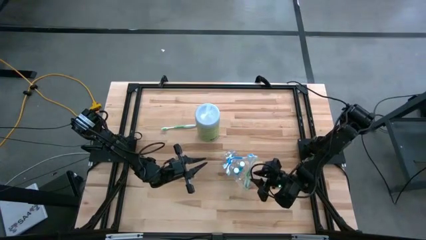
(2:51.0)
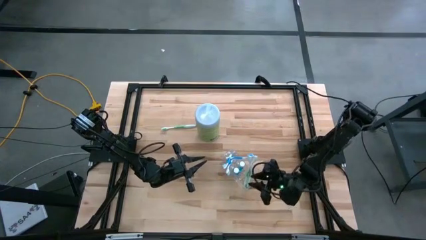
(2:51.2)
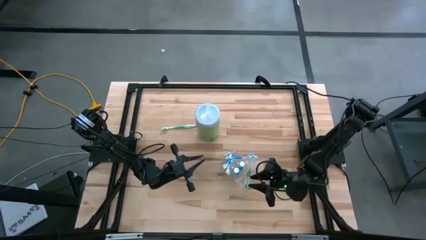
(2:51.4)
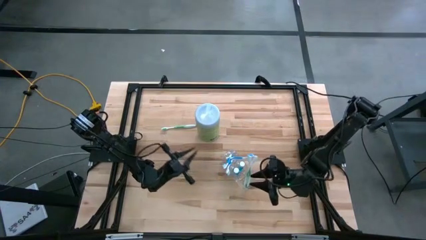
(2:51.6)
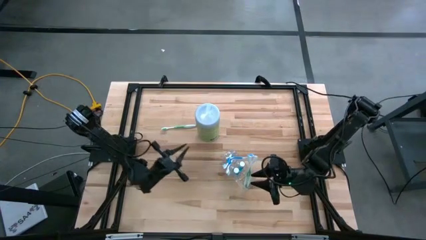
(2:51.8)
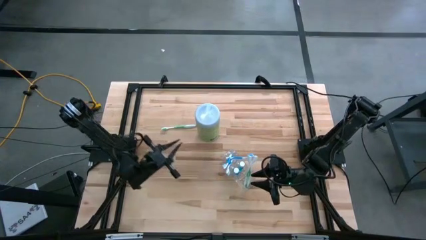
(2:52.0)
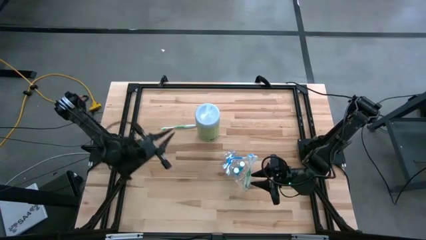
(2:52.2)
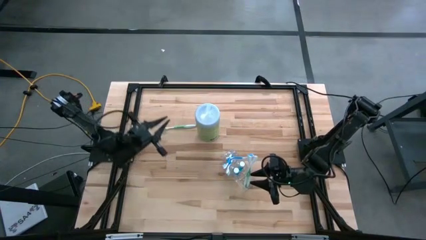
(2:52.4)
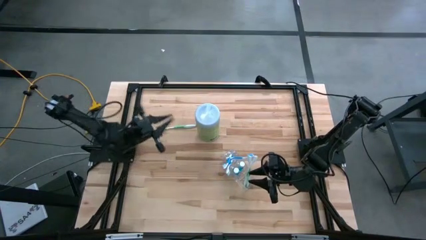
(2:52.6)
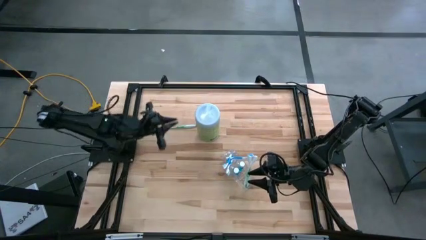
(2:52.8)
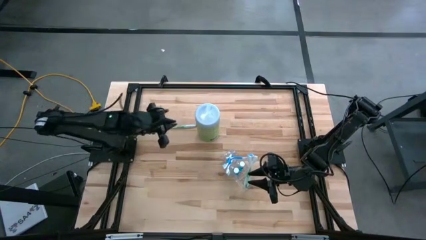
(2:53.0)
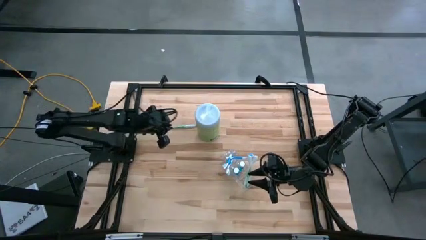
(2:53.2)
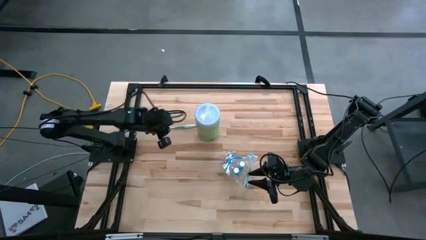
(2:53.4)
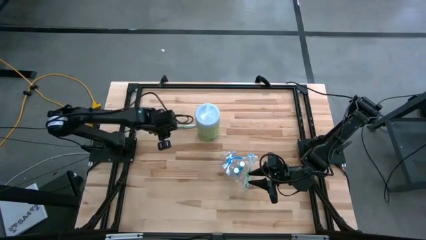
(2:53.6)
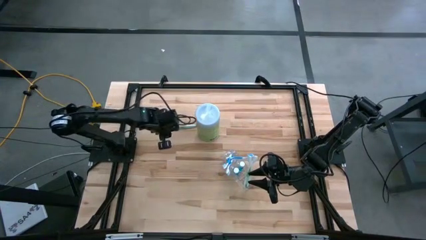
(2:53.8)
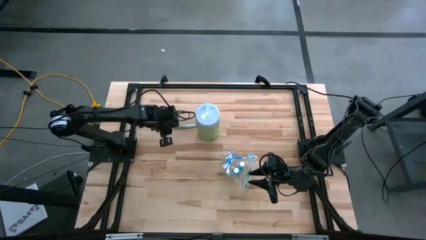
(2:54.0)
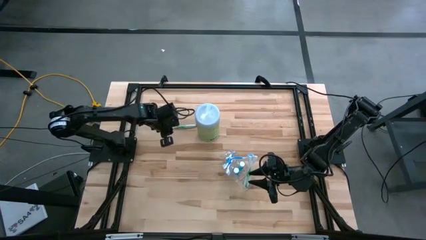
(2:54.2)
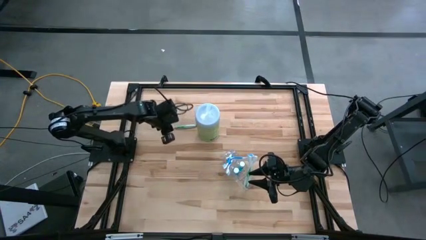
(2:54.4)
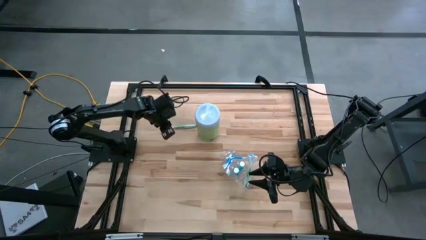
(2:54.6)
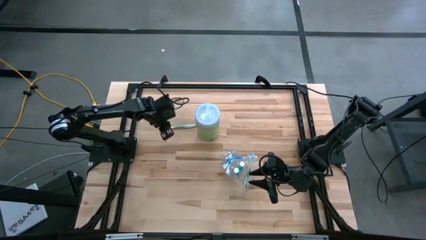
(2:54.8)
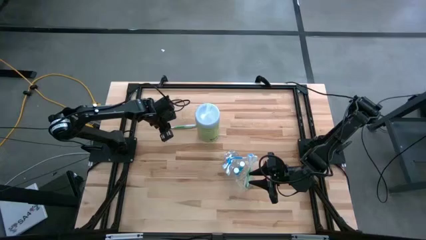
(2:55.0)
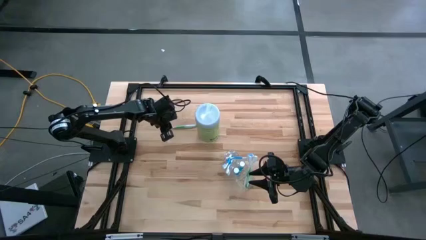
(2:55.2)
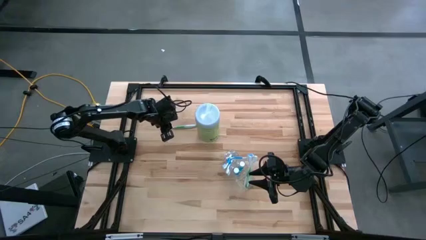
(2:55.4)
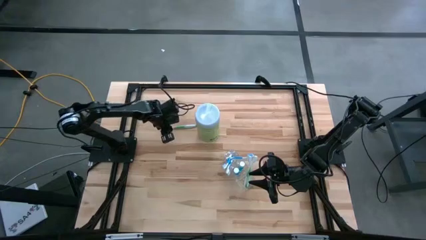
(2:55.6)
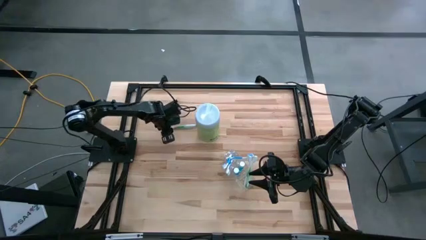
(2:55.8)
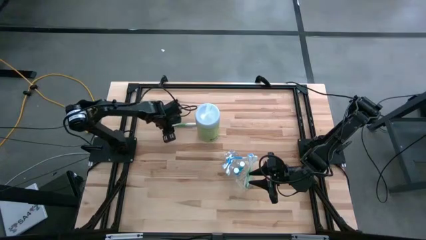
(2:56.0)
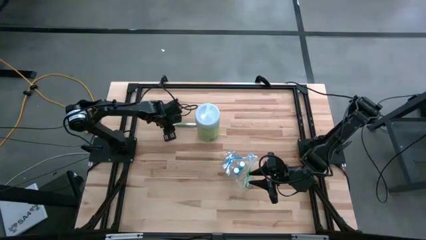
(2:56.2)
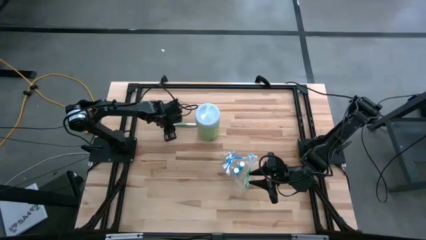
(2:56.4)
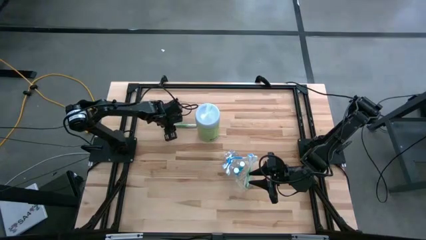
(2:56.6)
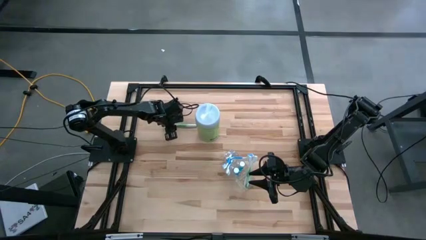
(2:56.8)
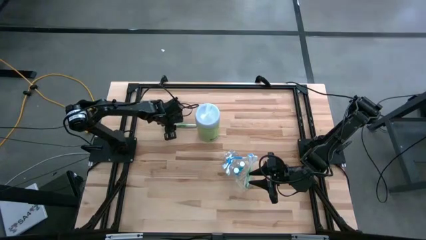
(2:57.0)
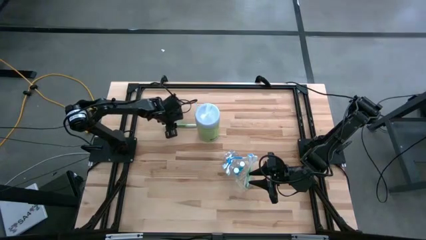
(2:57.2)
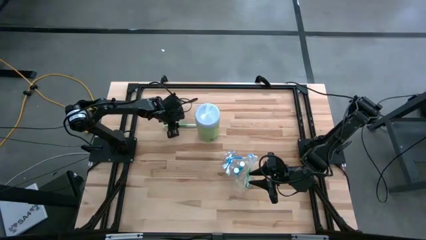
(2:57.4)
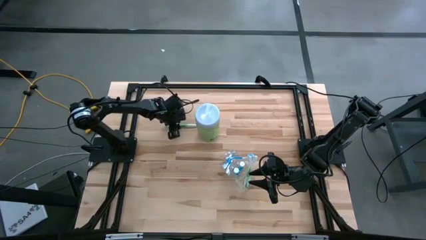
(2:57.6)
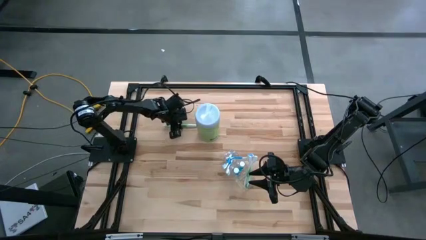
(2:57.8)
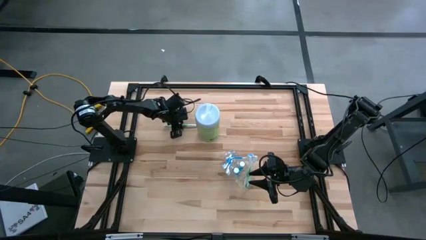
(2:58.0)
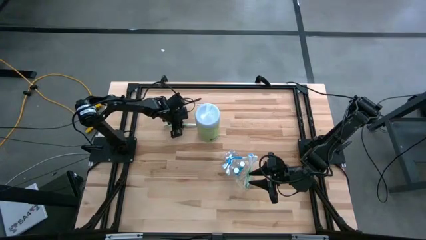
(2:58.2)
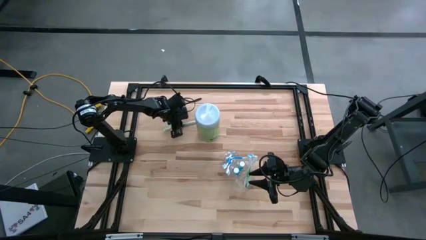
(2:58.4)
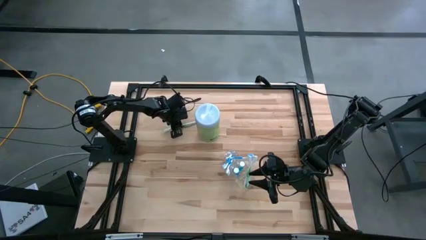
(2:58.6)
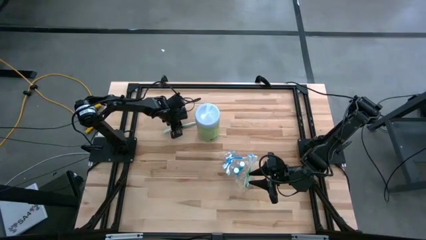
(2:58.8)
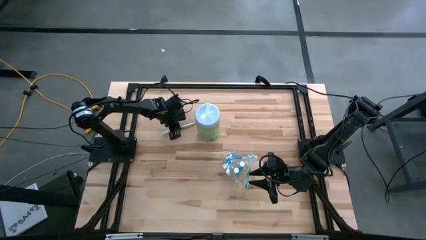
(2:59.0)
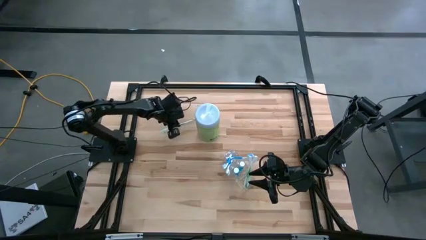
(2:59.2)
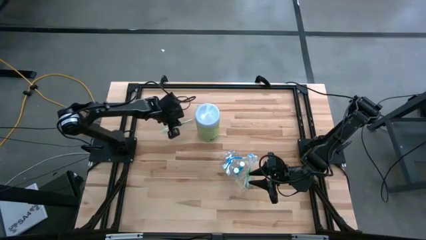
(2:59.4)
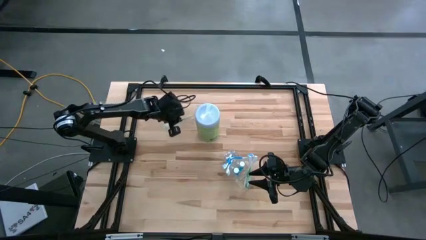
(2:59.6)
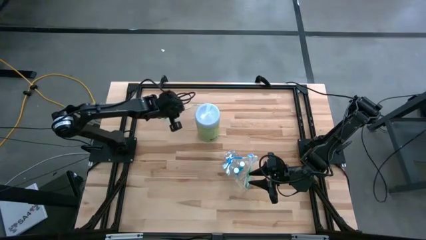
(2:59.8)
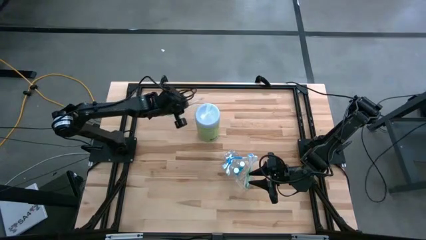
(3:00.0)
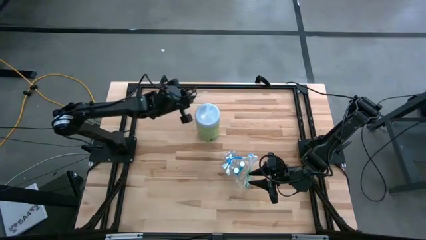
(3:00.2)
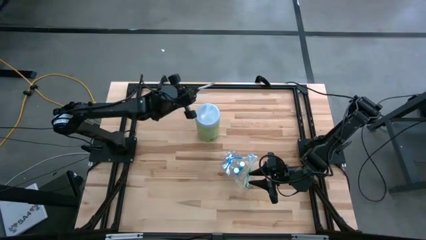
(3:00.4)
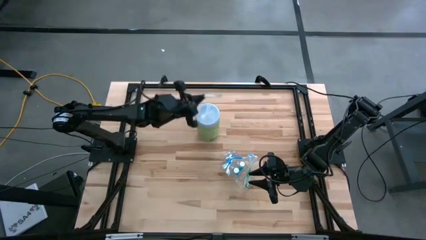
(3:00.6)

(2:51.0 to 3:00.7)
Task: Pick & Place toothbrushing station
Put the green toothbrush into the transparent organizer

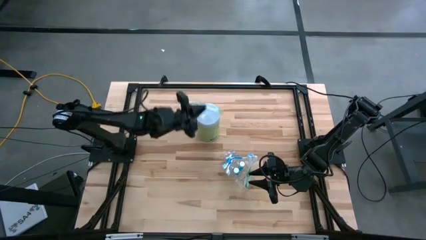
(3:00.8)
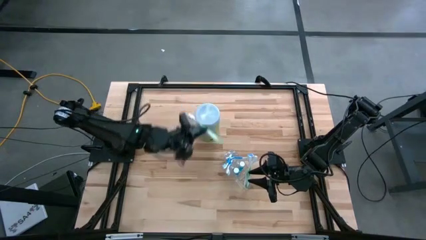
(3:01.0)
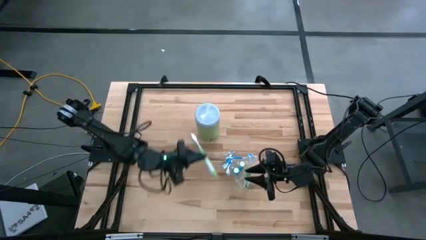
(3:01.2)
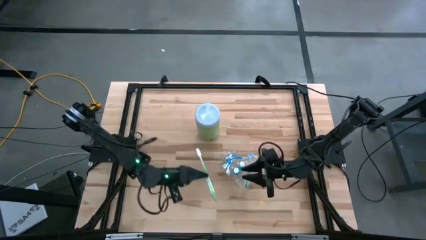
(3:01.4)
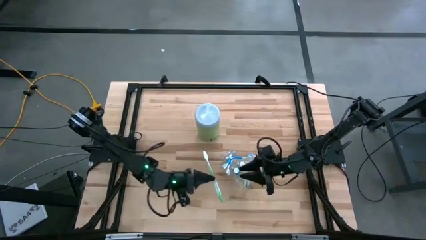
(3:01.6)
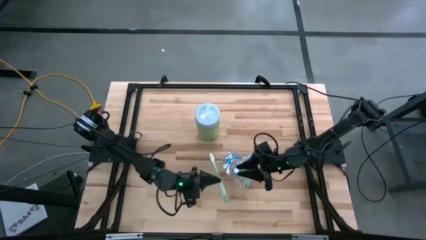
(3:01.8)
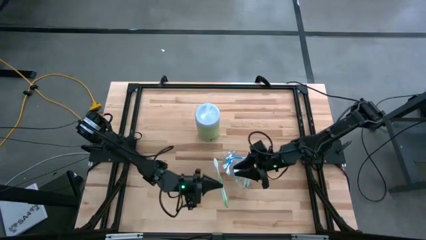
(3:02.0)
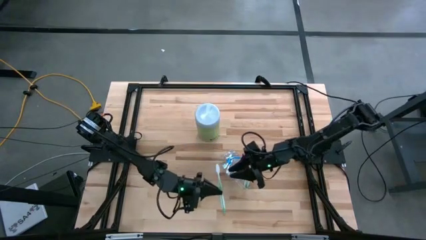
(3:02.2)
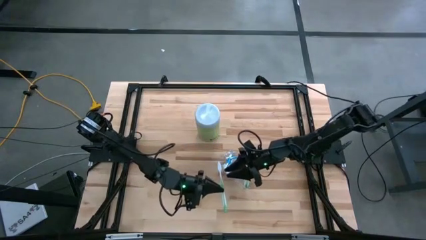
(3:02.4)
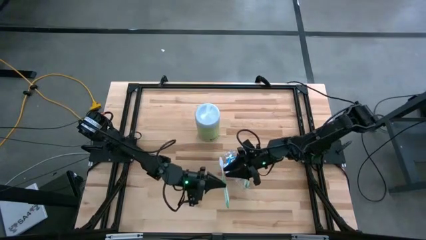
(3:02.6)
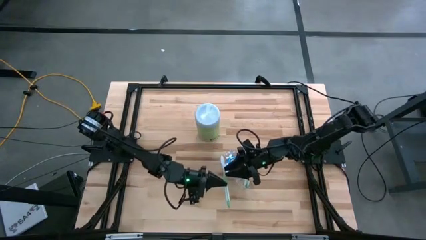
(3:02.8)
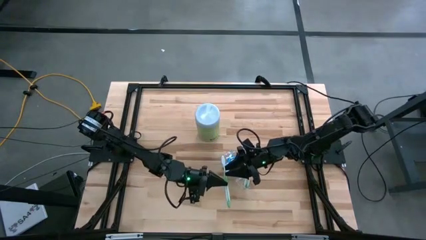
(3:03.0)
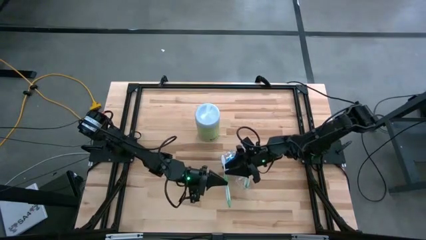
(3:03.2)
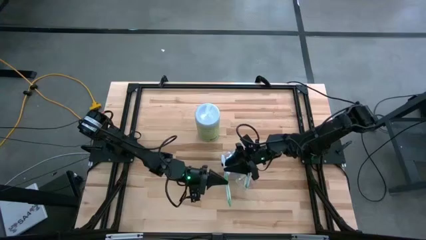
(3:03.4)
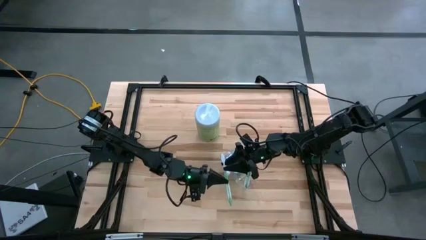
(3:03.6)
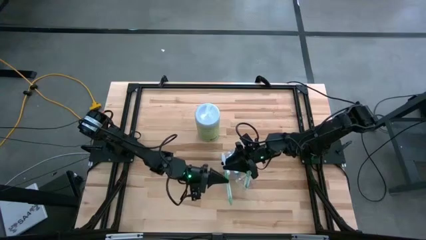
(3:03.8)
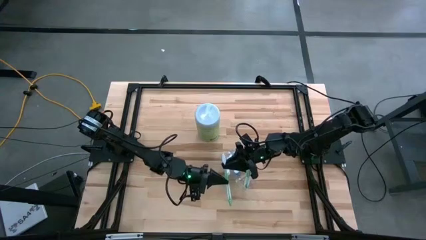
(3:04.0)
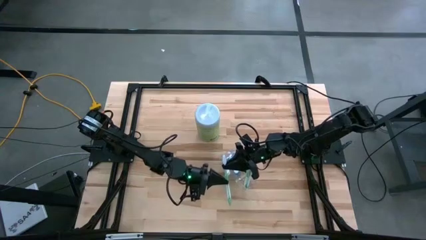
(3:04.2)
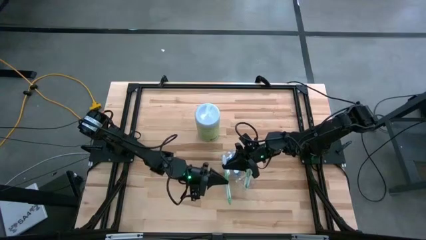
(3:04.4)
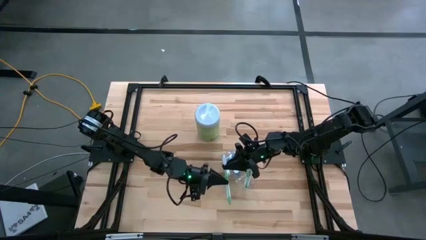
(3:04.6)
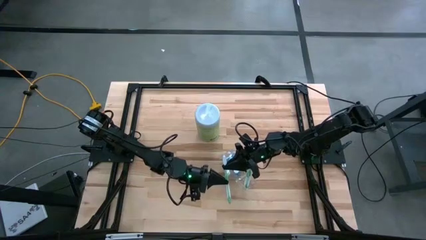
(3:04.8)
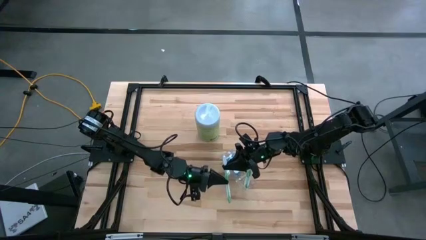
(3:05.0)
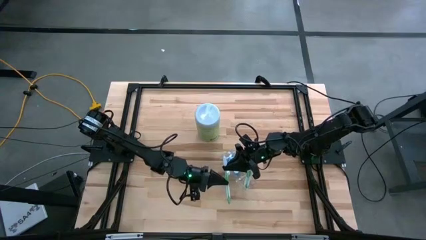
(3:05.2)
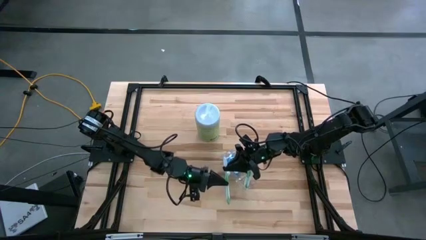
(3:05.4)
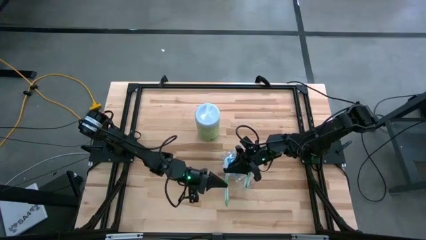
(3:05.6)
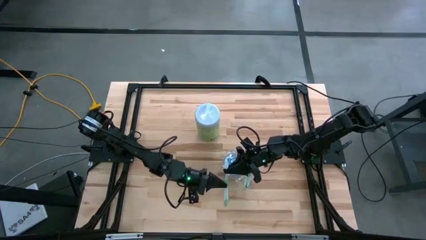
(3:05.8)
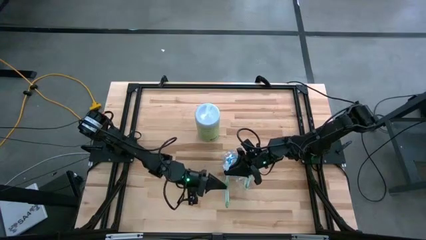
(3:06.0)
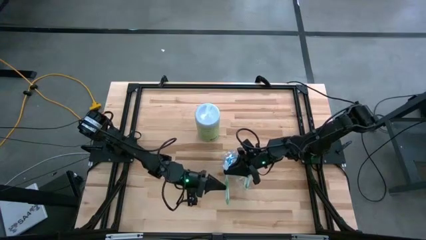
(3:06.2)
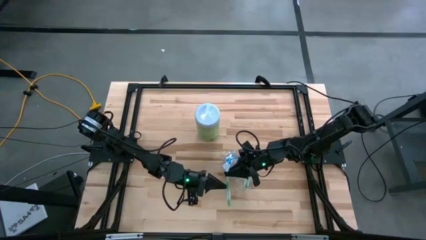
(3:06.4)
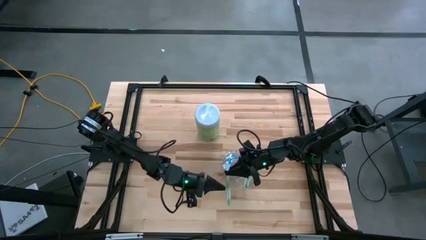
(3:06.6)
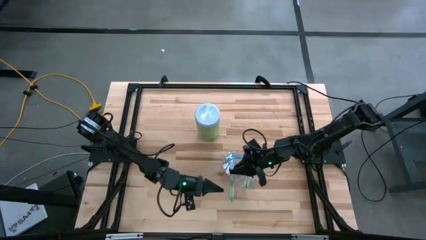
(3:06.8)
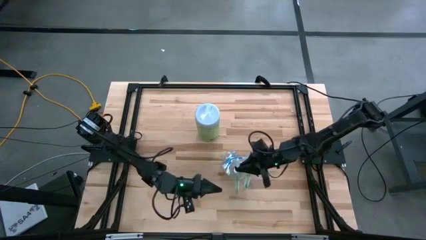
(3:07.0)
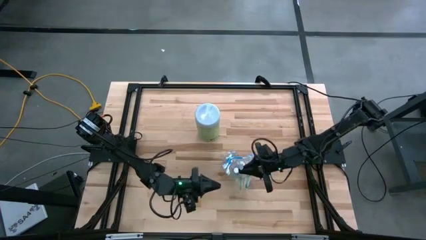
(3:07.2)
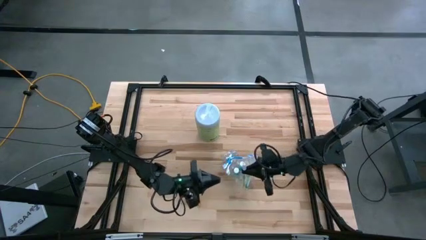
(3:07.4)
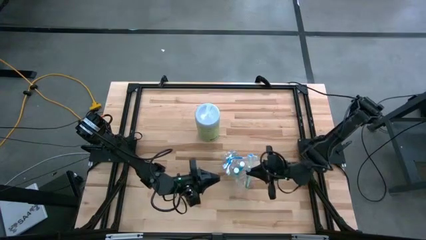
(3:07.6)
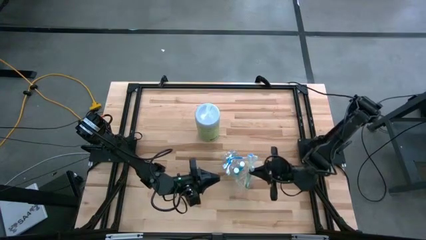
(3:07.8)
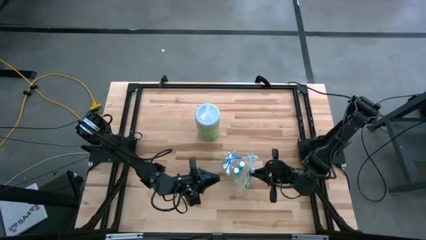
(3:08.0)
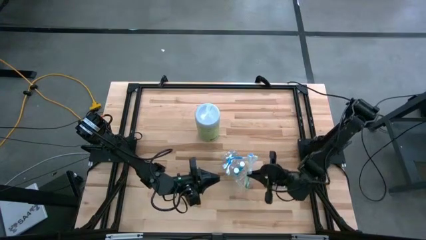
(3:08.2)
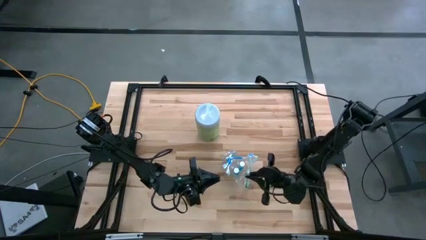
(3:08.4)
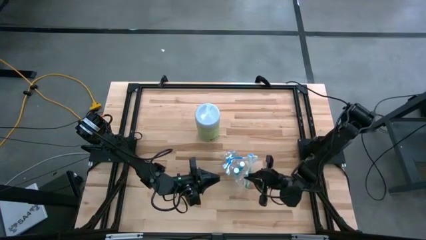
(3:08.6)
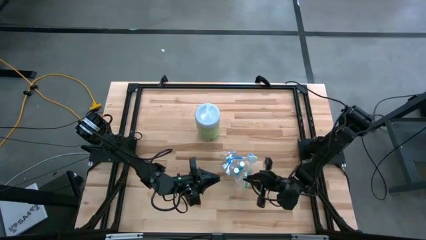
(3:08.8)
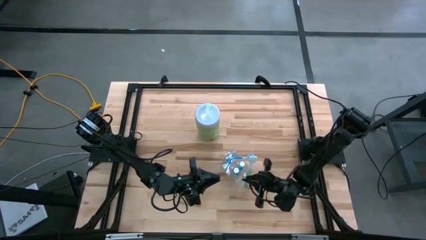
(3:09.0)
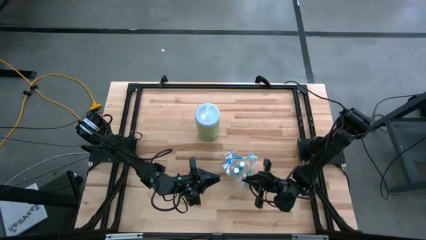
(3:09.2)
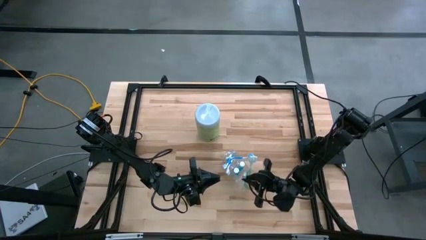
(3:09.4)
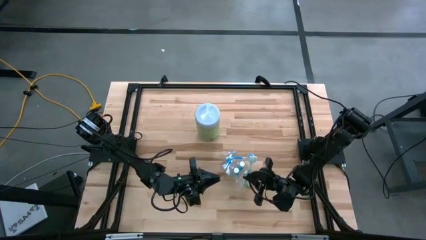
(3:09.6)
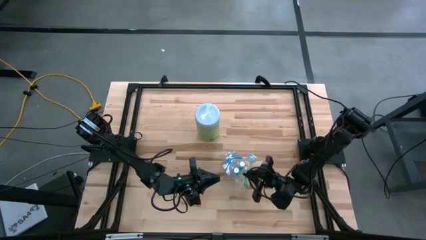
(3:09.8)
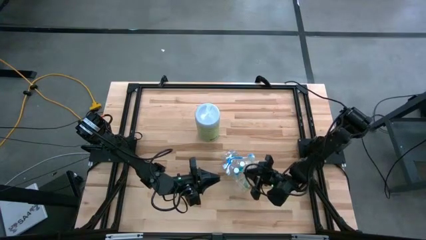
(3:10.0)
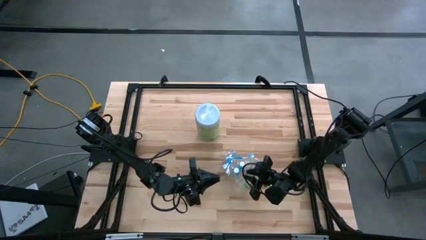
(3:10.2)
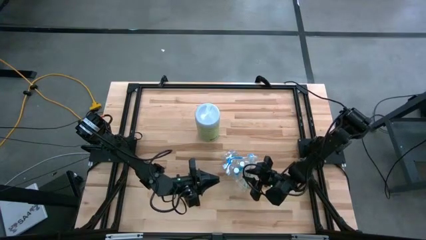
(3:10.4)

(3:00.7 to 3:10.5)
Put the green toothbrush into the transparent organizer
